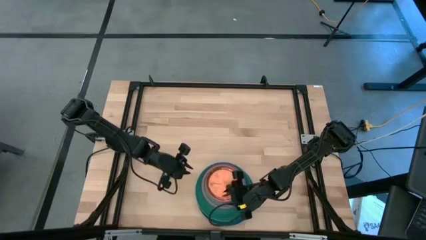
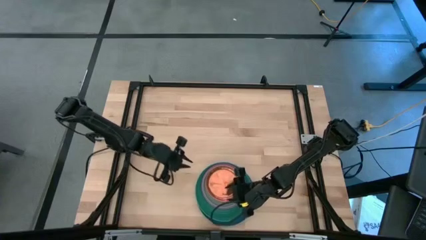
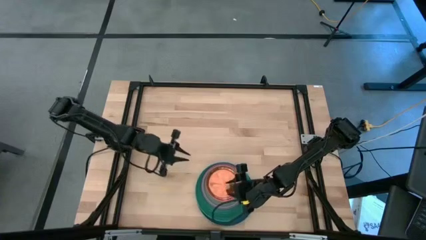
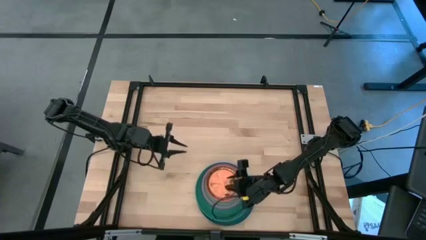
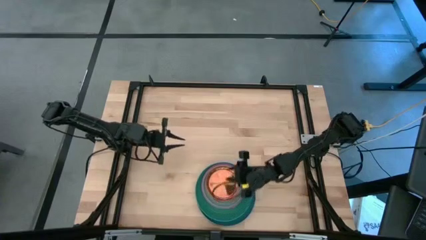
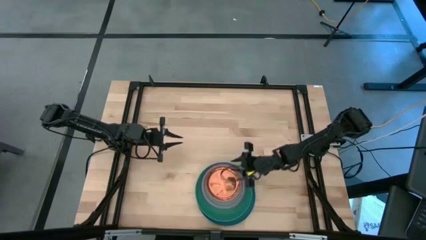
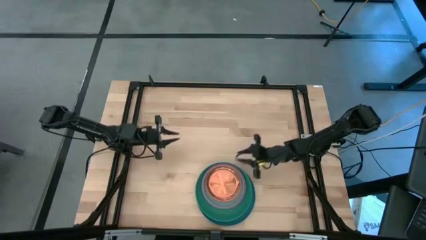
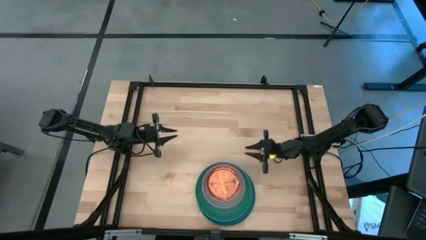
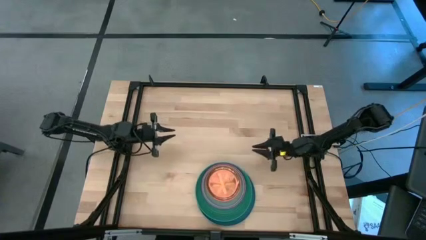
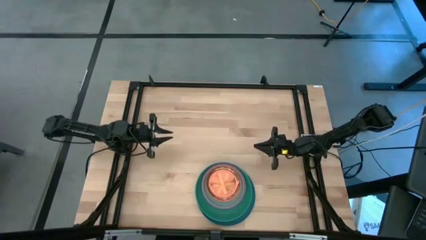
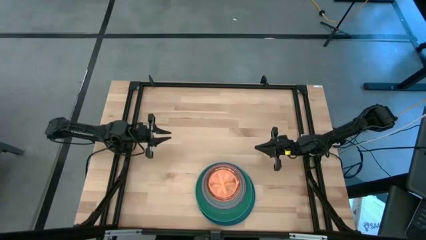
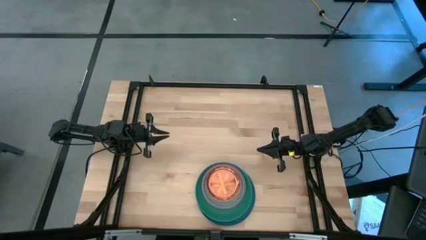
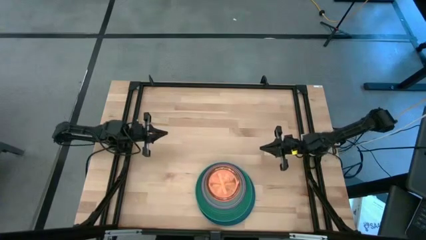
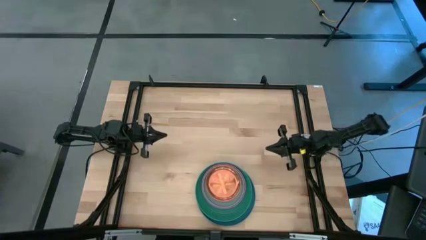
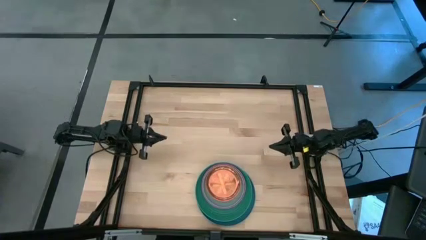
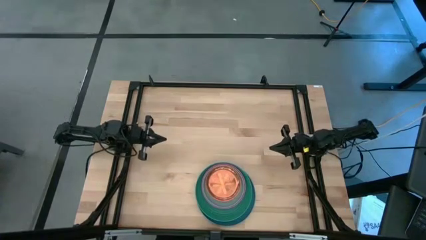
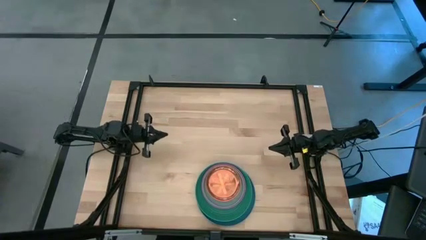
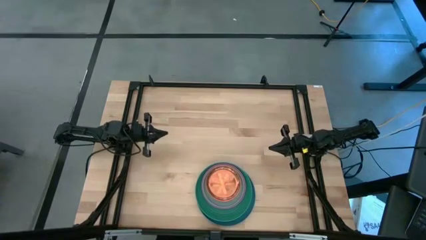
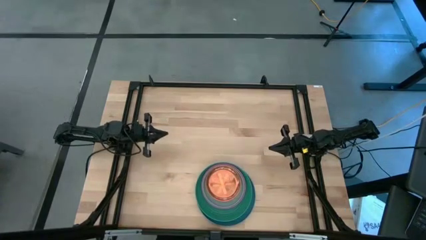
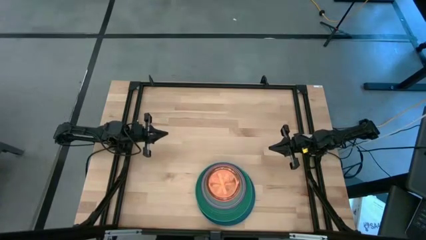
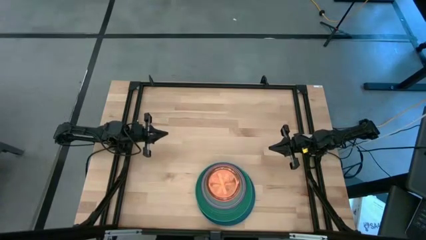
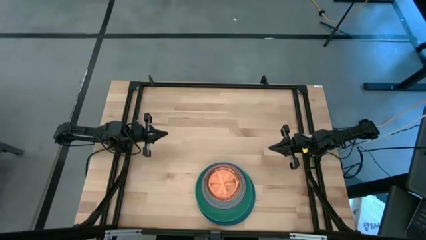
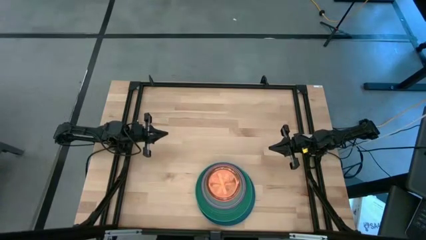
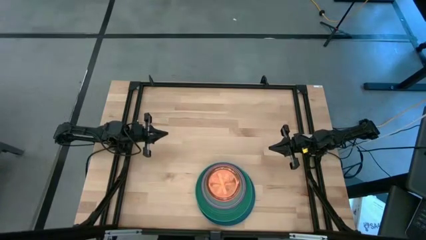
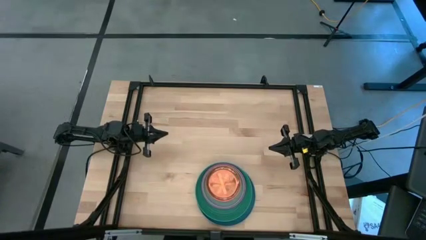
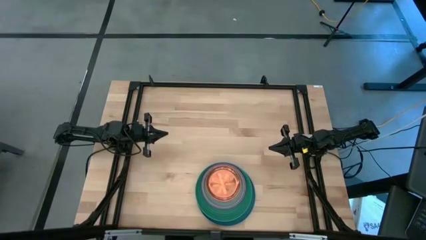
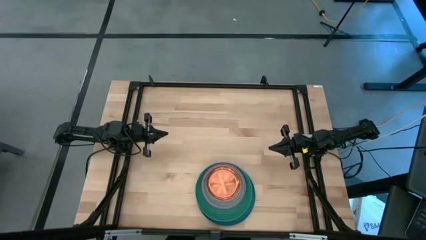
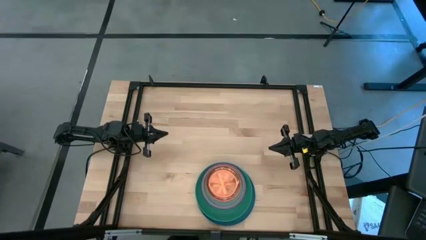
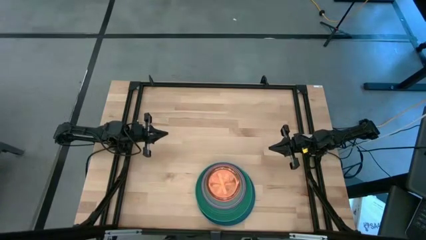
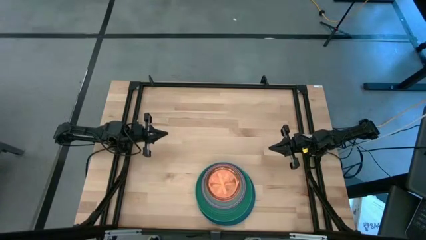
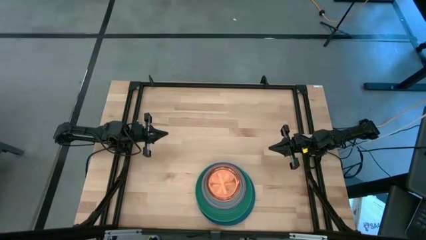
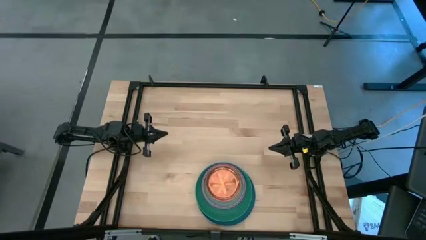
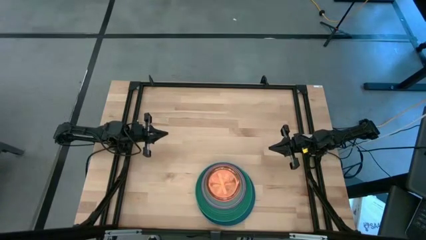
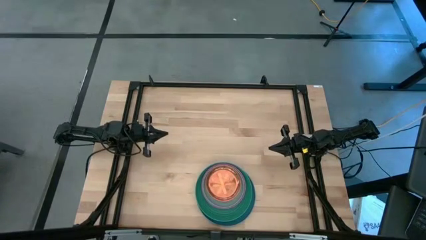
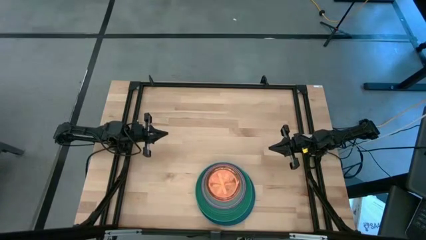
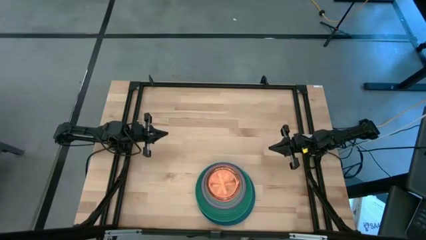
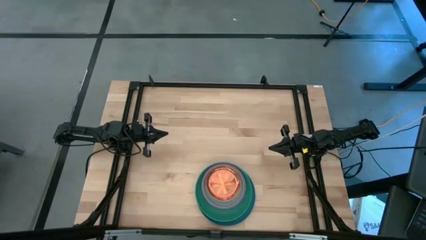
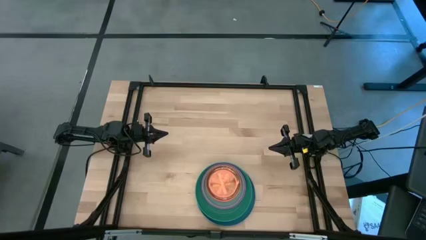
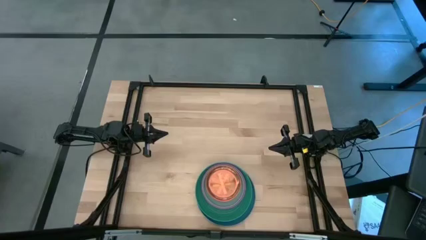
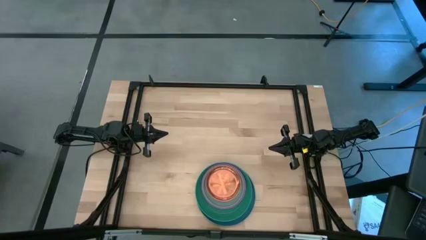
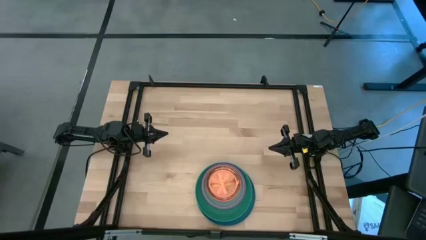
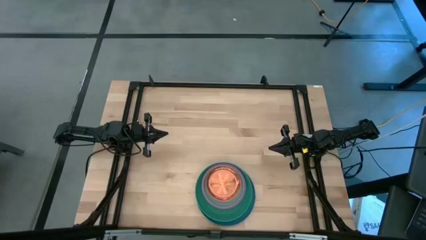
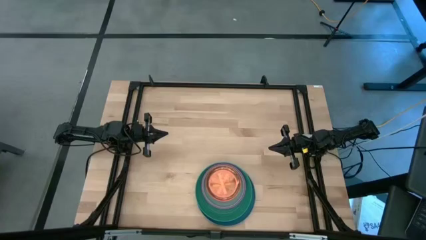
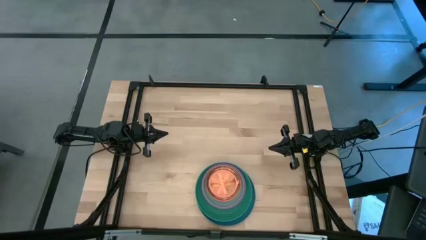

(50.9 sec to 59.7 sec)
Task: Stack plastic plates
Return to Home Position

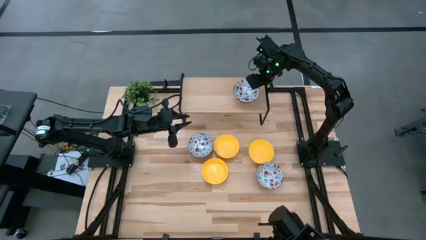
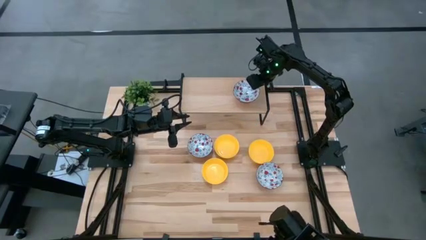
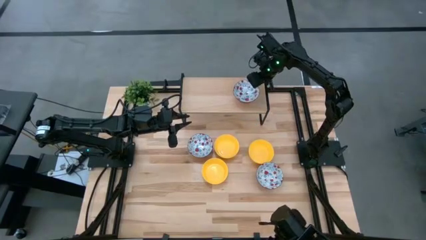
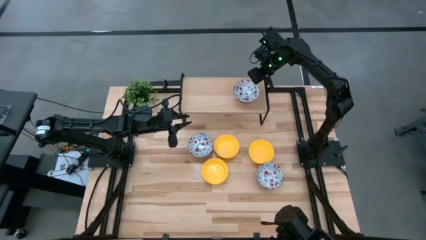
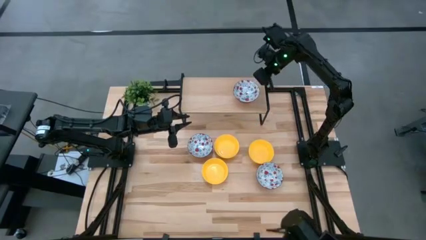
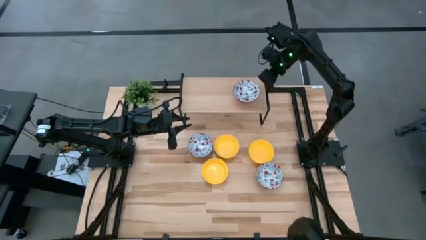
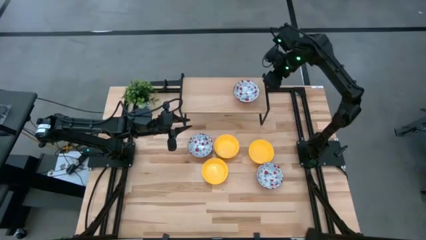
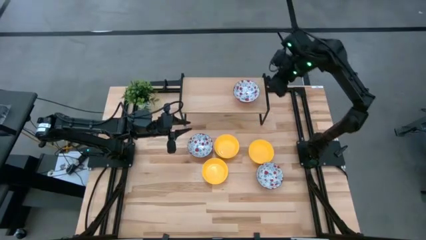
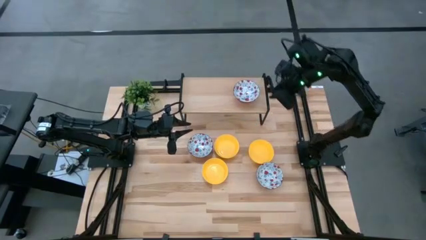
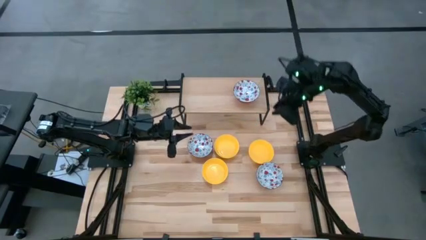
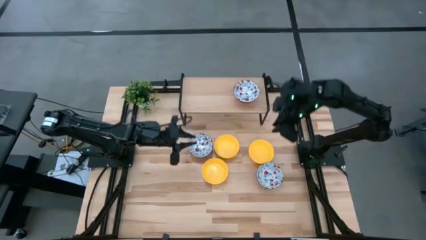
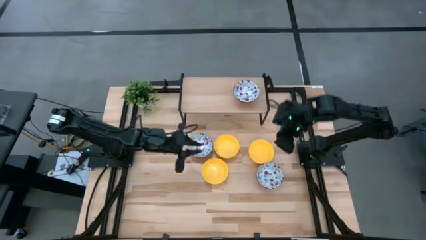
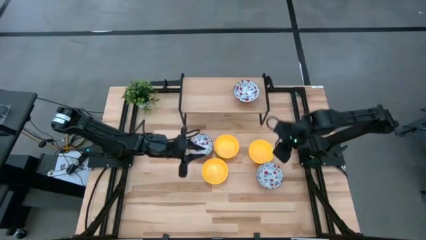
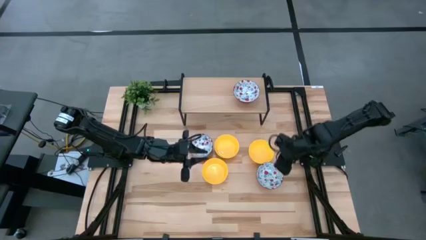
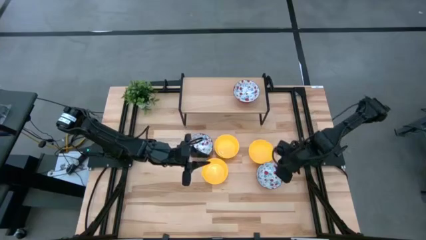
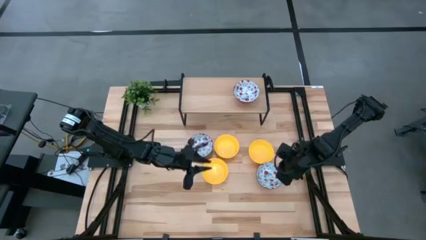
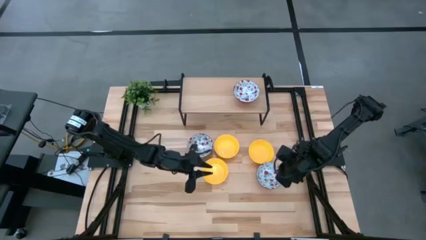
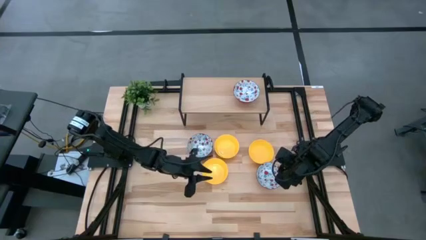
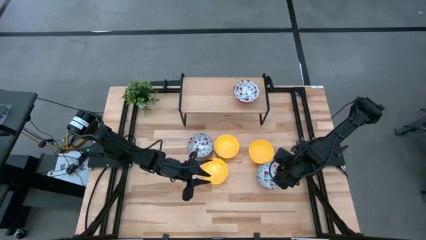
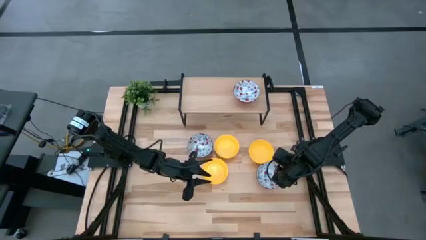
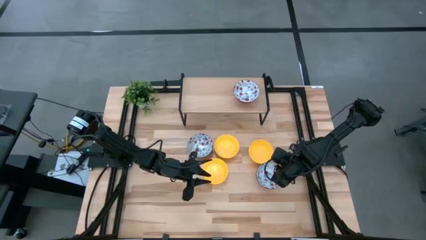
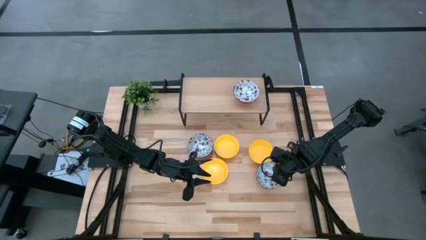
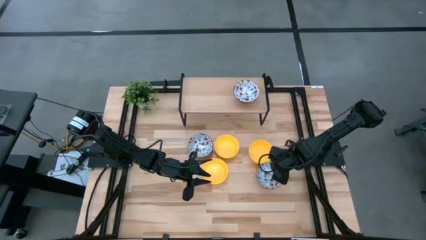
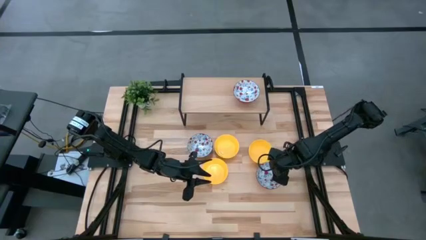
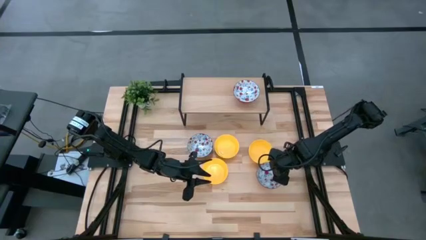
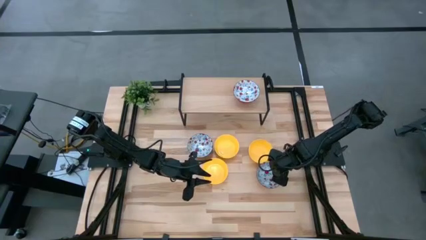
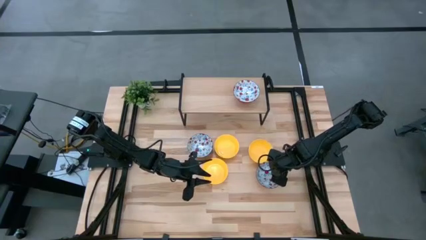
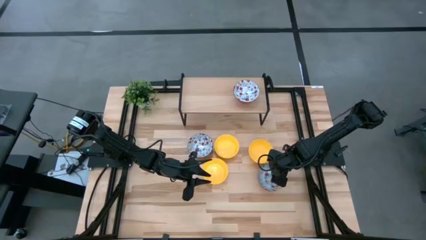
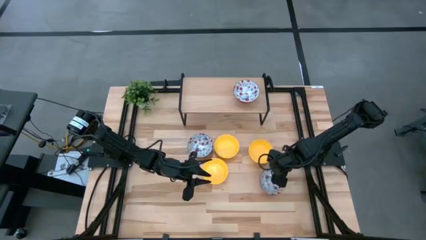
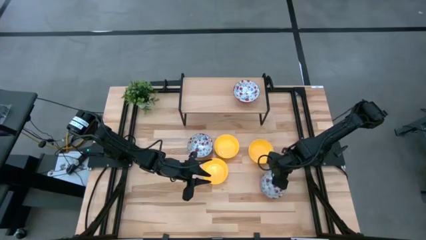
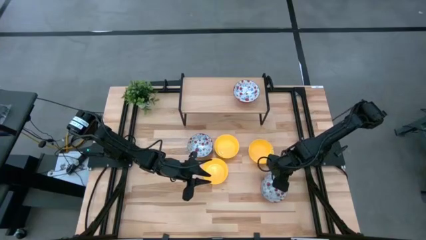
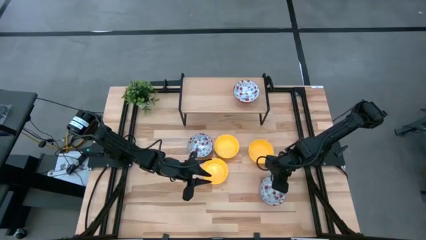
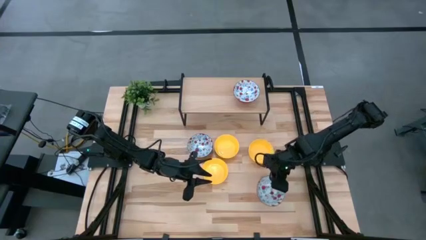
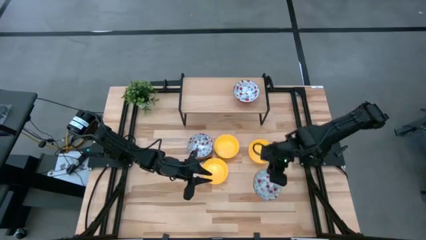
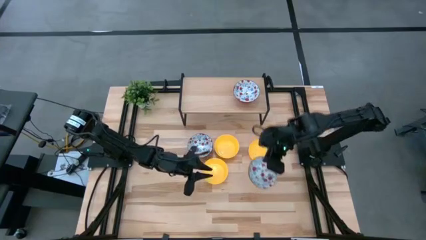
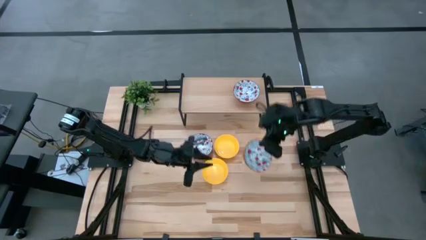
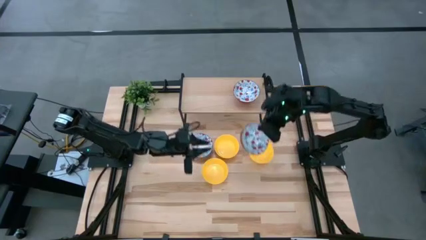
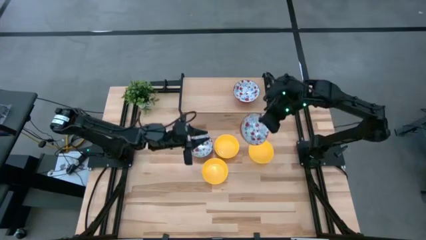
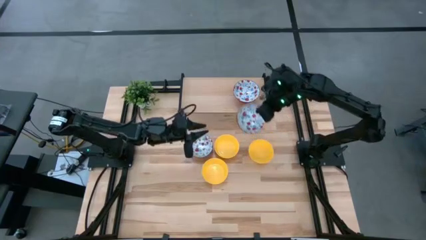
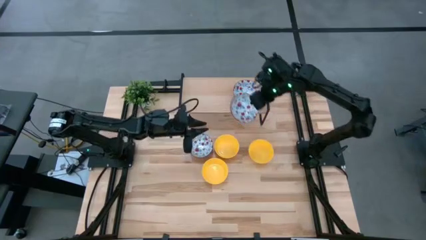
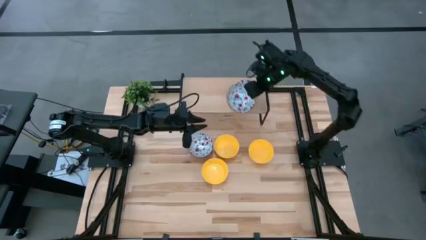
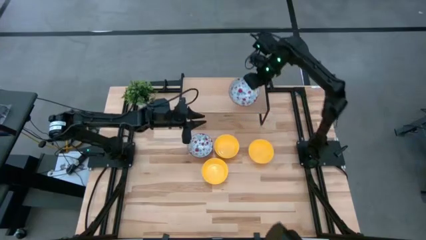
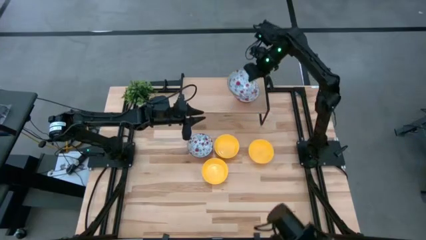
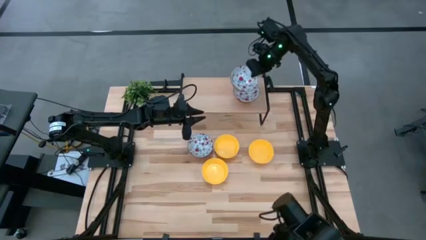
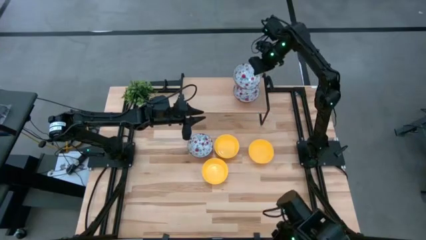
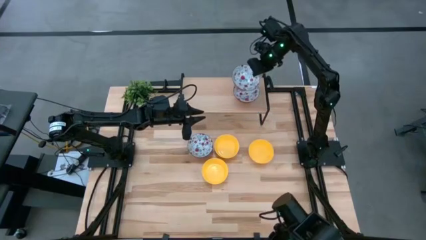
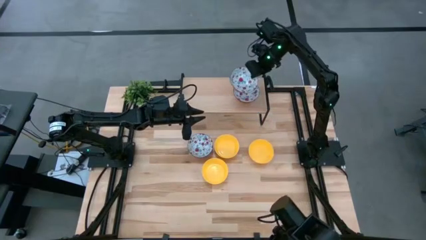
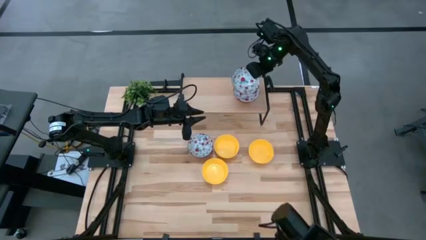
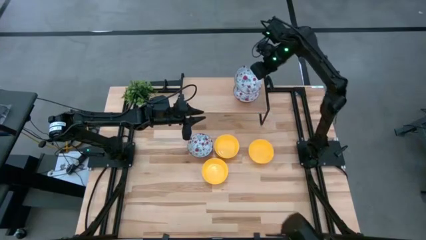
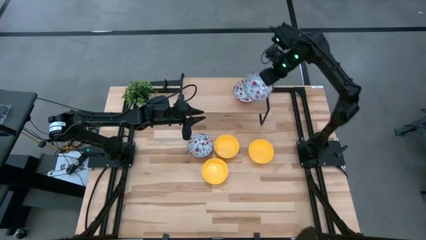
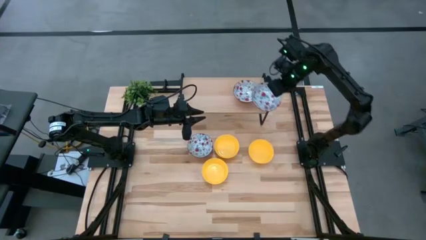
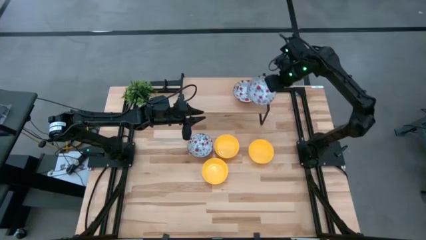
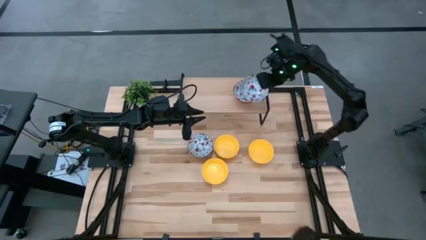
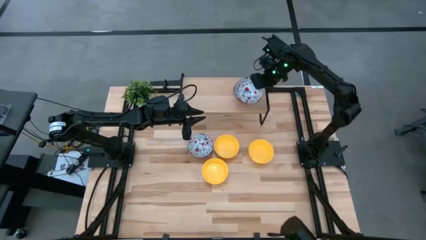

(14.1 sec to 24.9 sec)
Task: Pick & Place Mini bowls
Stack the right white patterned bowl on top of the white patterned bowl on the shelf
